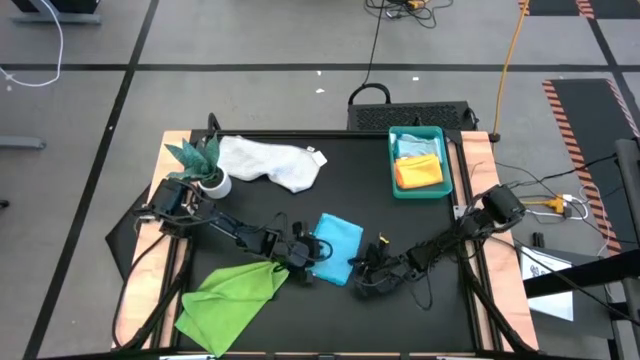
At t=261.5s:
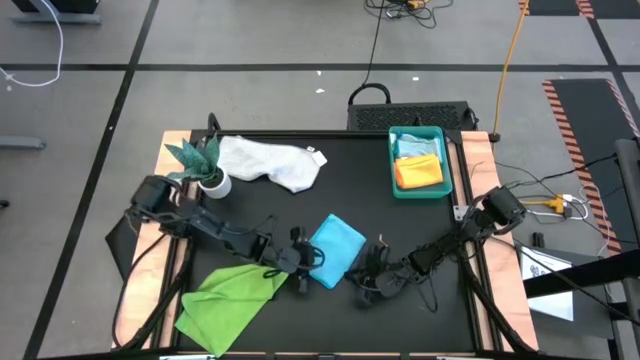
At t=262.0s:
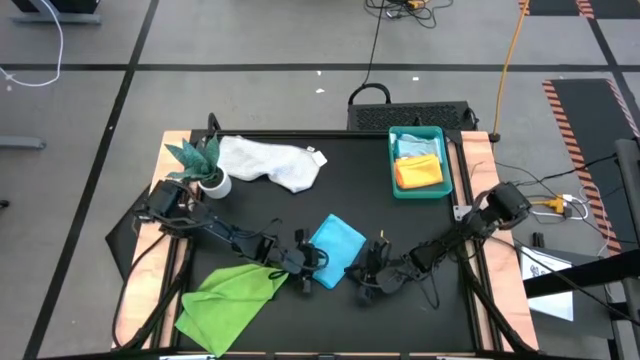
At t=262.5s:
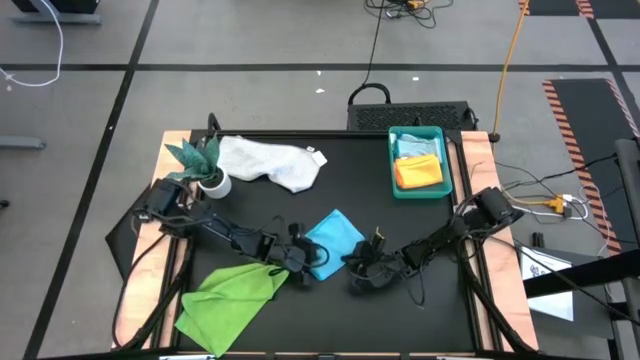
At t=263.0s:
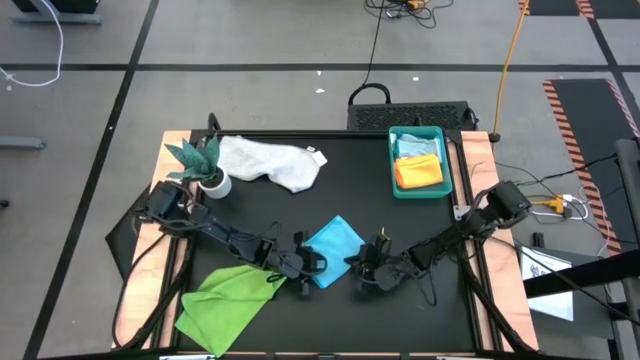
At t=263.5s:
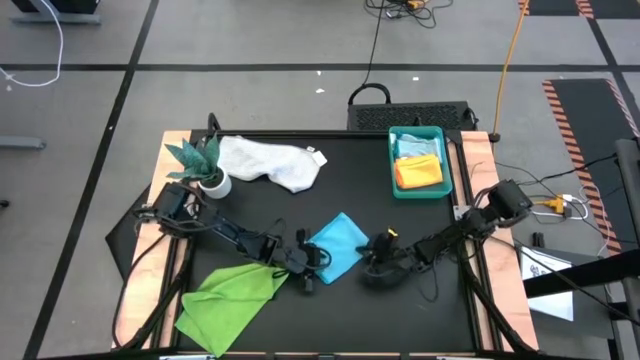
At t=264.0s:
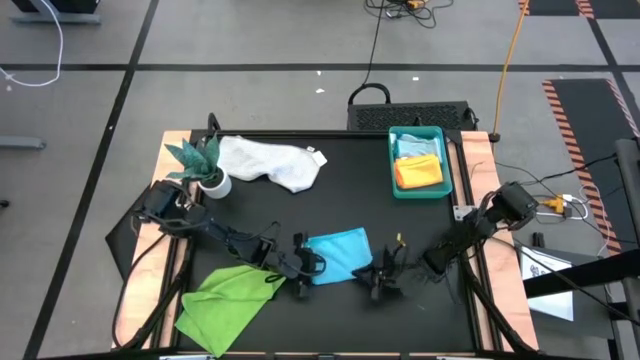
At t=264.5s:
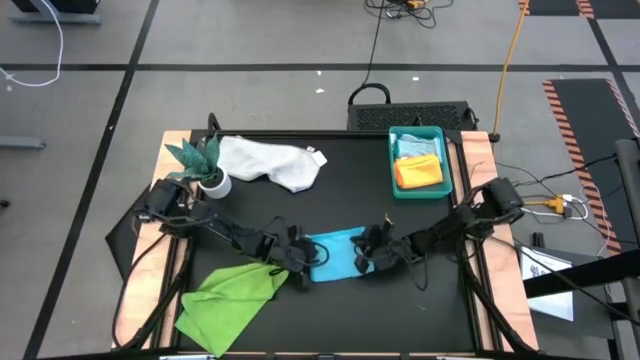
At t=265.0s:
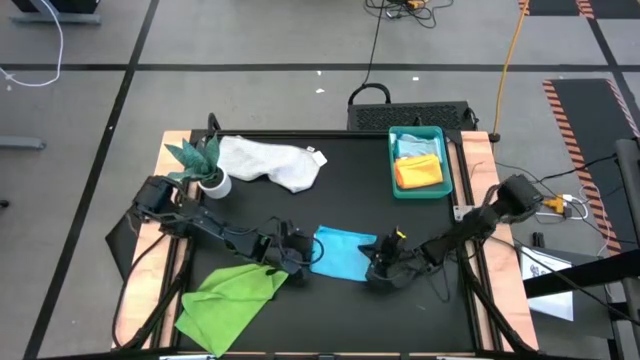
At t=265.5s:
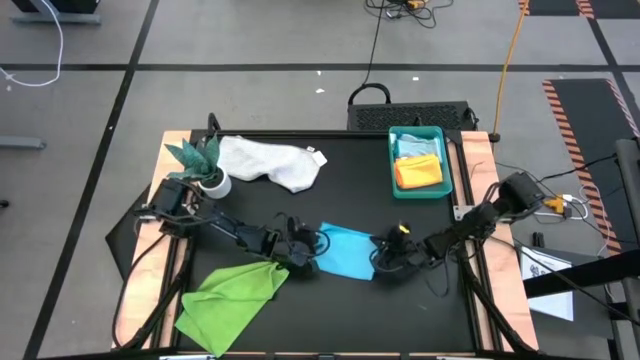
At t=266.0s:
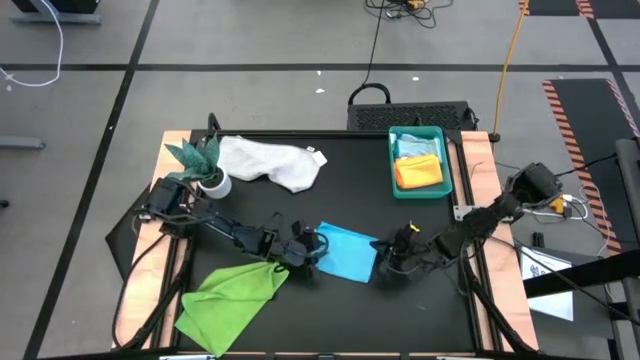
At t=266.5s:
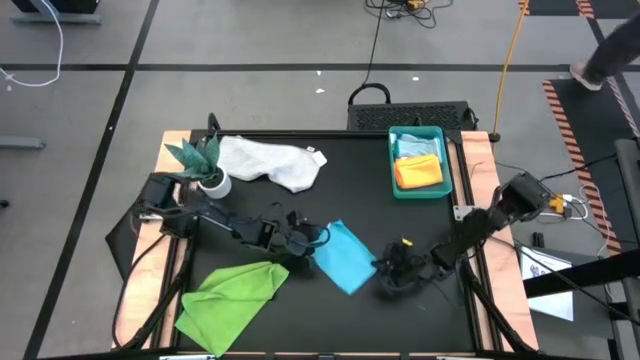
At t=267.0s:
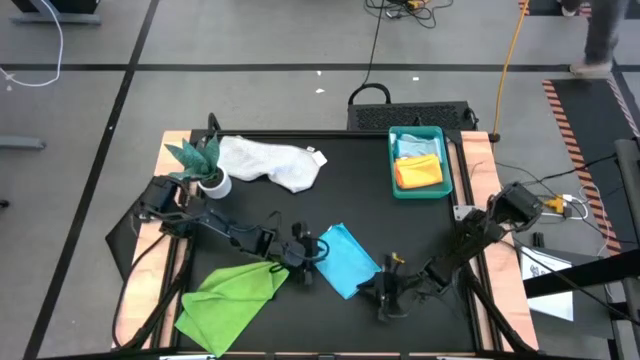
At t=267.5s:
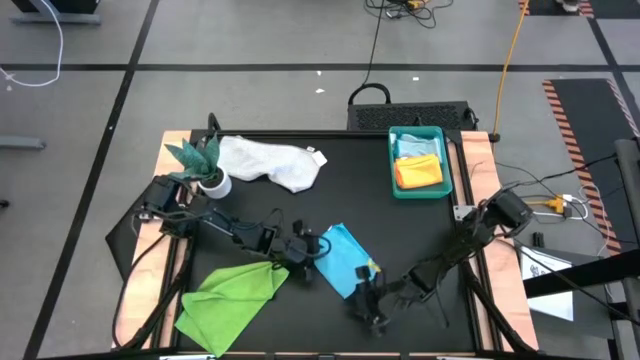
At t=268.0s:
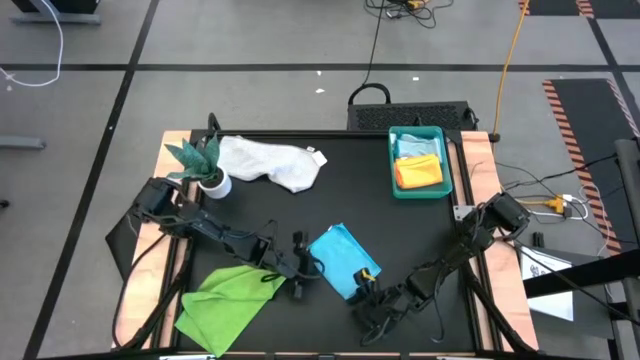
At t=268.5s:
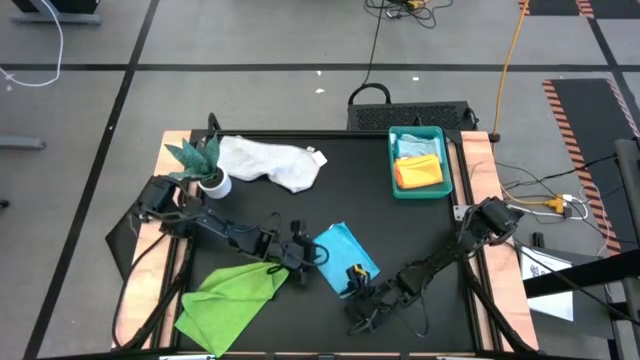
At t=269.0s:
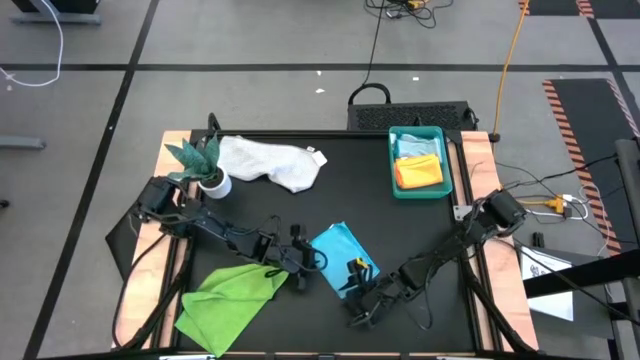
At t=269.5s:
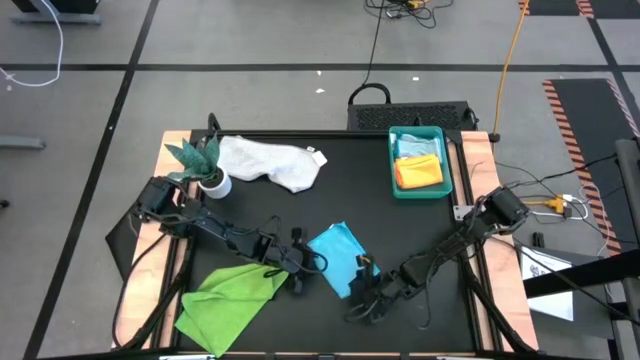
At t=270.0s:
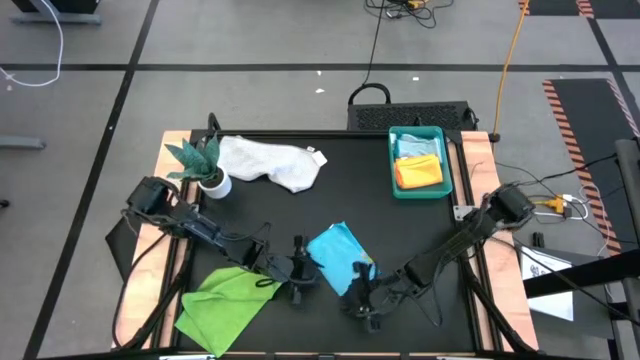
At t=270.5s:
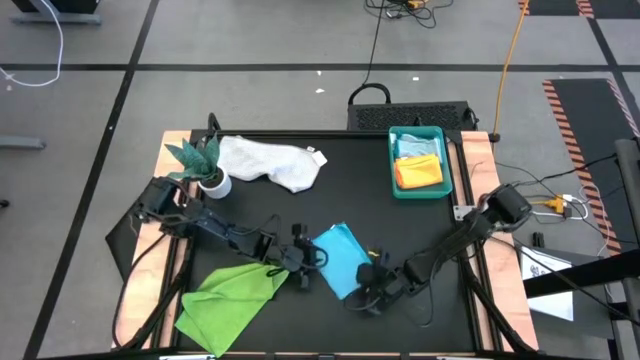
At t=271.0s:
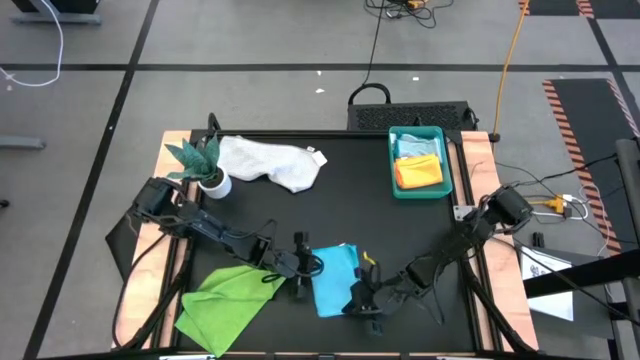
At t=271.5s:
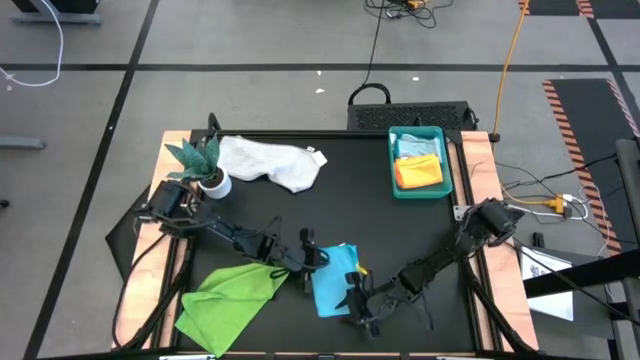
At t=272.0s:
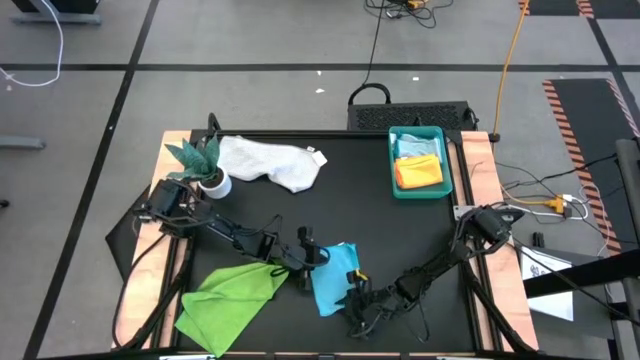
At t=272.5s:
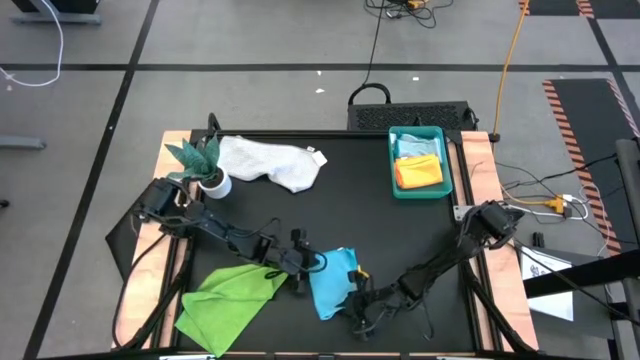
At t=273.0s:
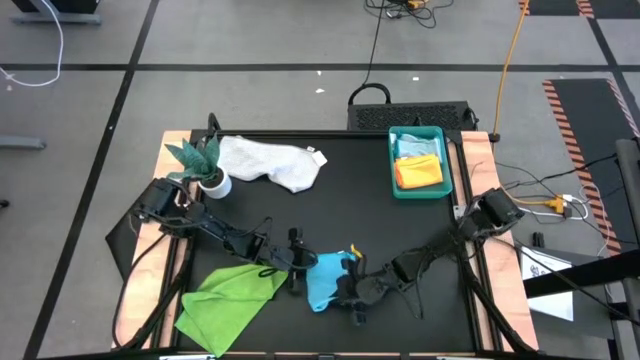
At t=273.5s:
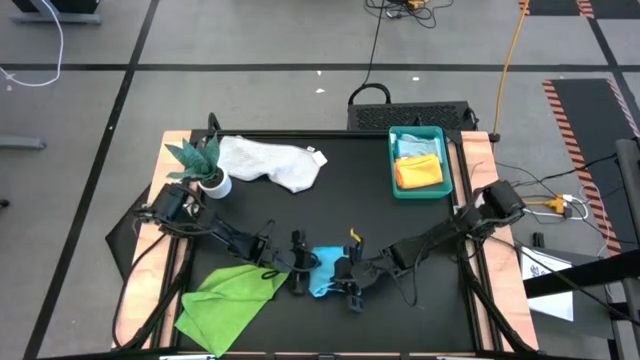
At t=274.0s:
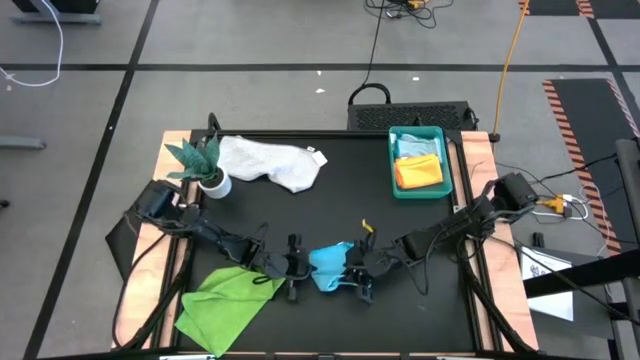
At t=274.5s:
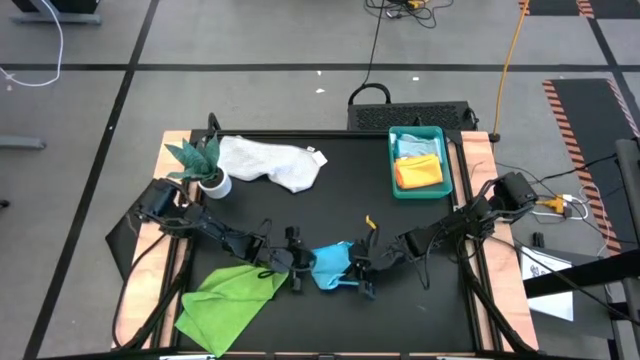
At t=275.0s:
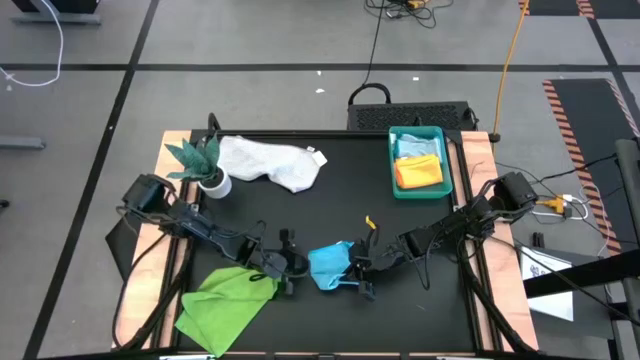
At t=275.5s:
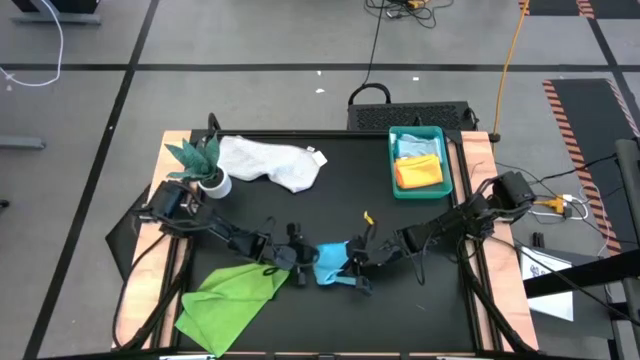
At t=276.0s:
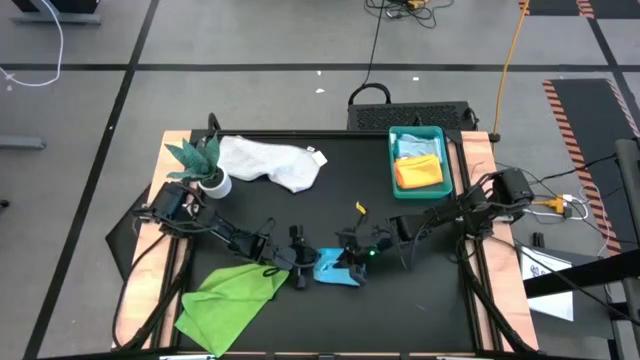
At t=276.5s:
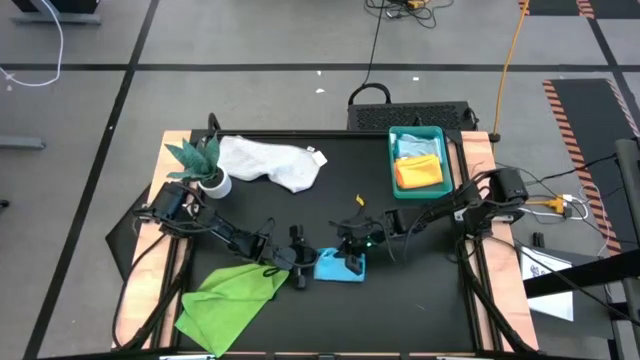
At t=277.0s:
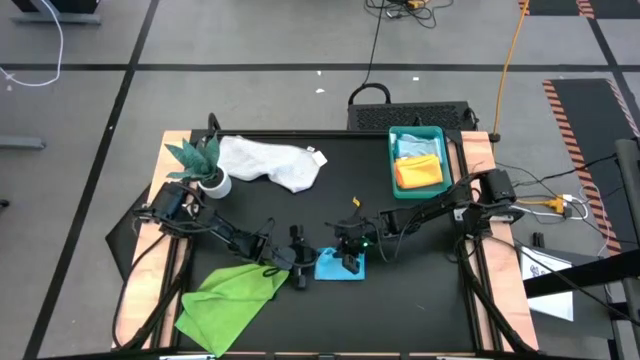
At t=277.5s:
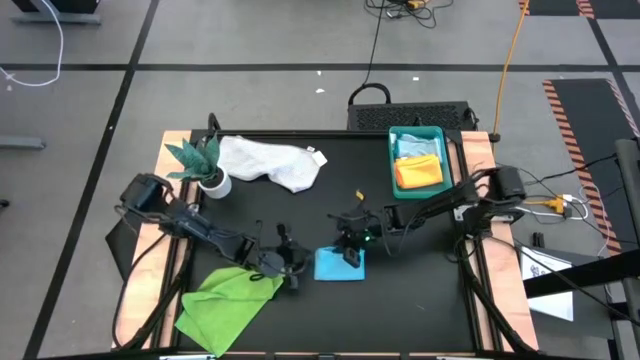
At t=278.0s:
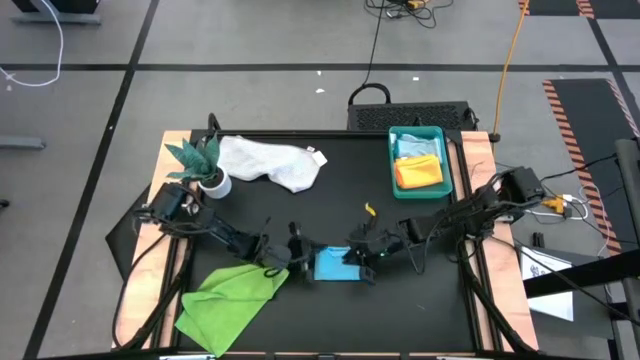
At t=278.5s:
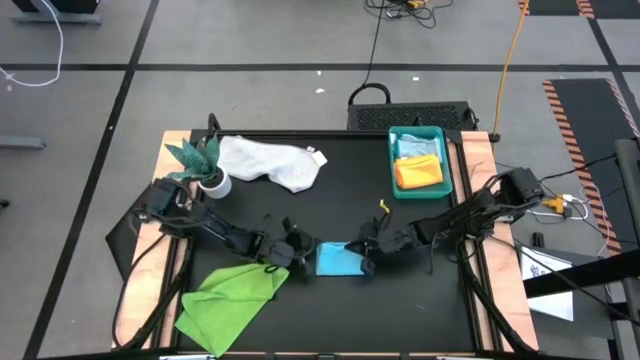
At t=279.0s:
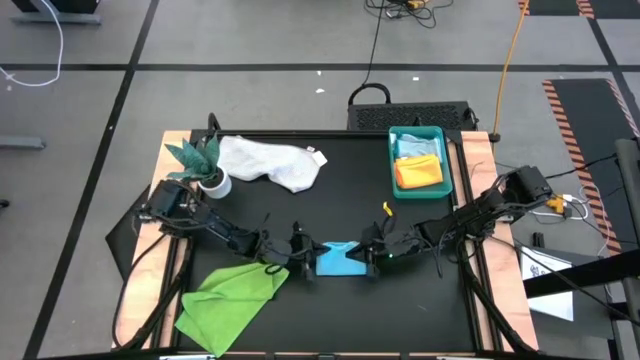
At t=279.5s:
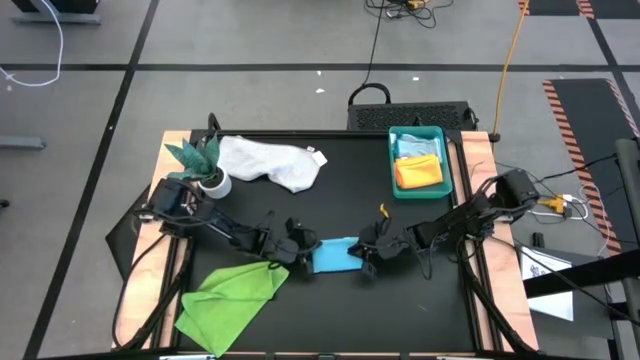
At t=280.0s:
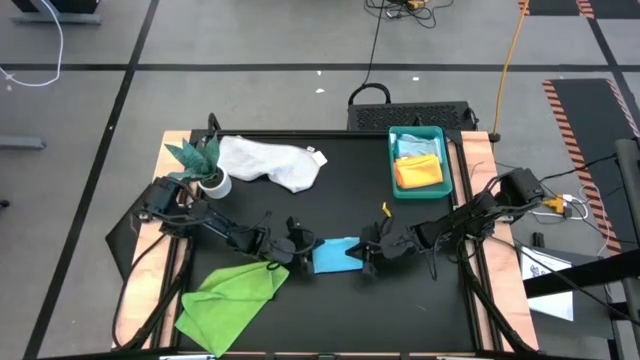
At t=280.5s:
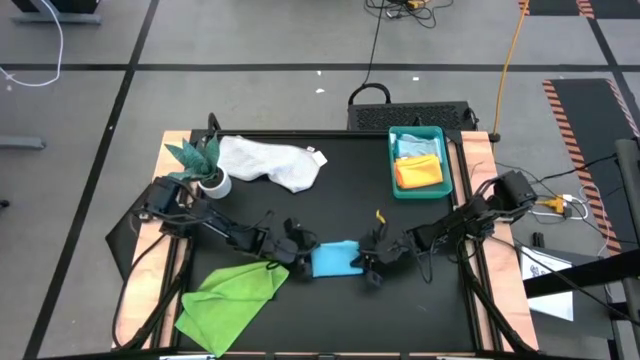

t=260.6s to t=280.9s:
Task: Fold microfiber towels
Fold the blue microfiber cloth
